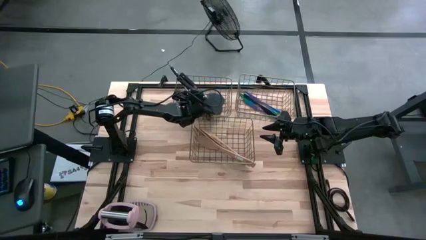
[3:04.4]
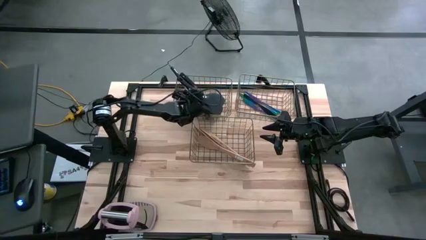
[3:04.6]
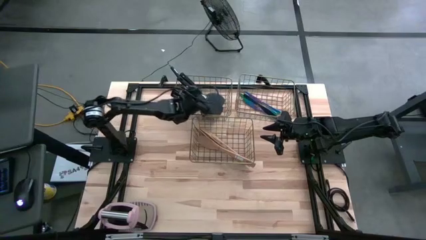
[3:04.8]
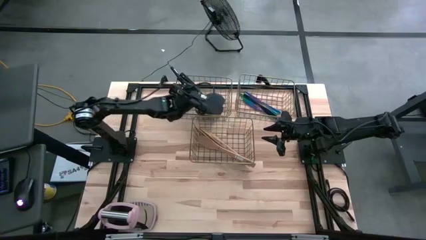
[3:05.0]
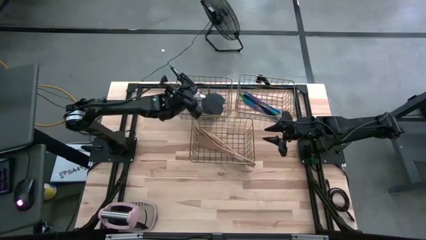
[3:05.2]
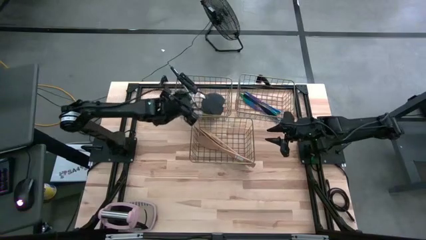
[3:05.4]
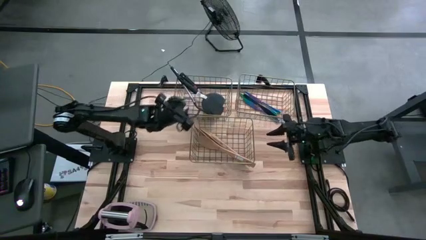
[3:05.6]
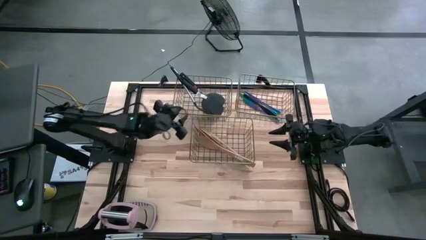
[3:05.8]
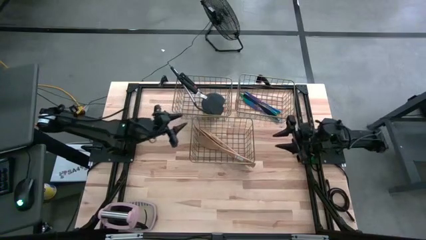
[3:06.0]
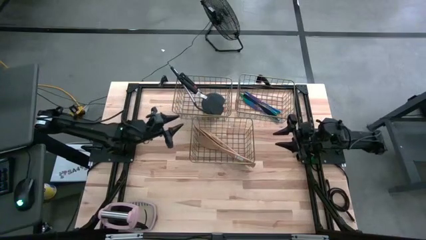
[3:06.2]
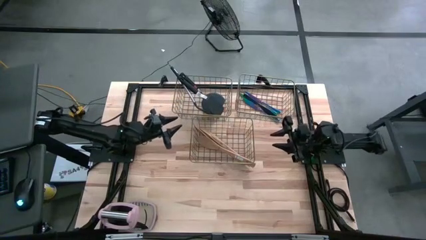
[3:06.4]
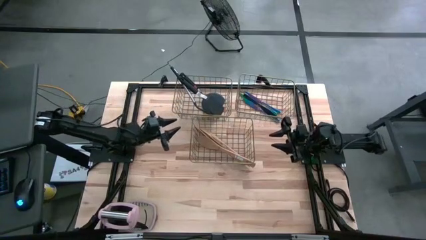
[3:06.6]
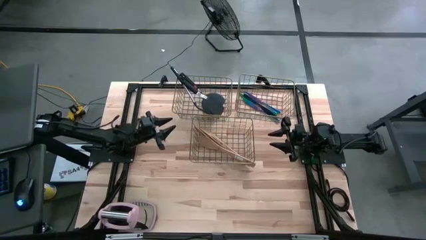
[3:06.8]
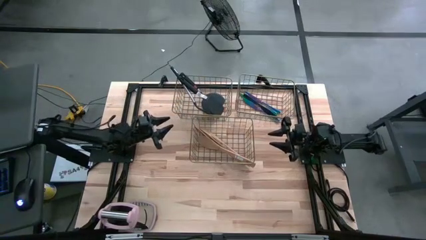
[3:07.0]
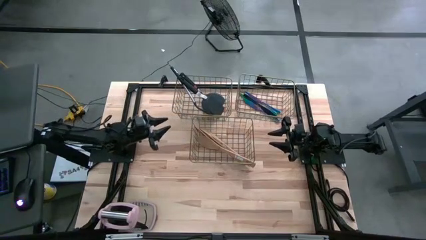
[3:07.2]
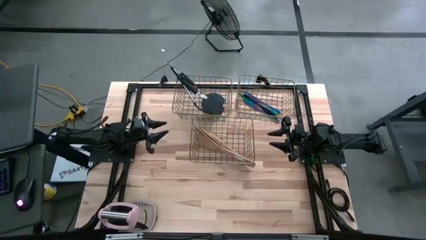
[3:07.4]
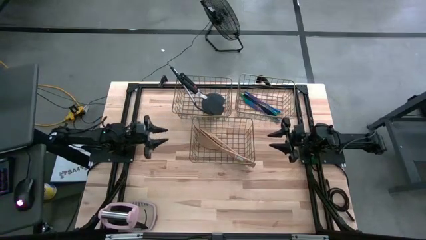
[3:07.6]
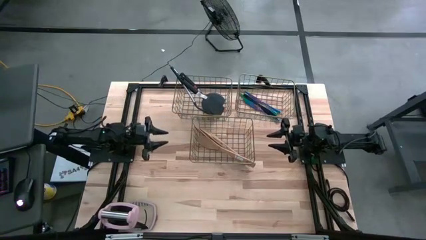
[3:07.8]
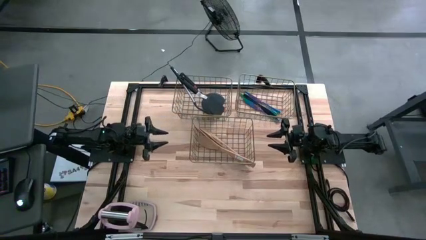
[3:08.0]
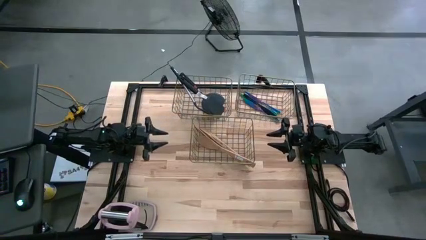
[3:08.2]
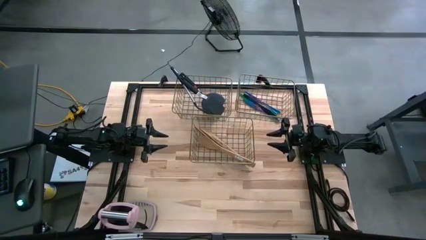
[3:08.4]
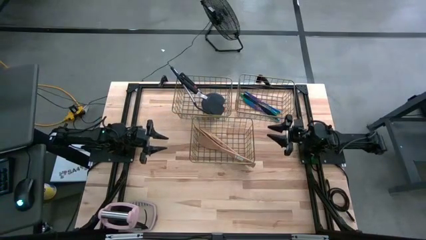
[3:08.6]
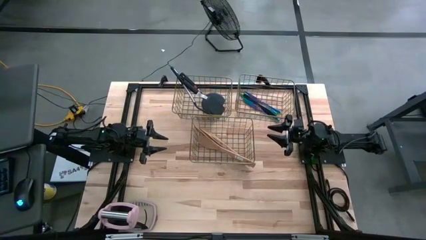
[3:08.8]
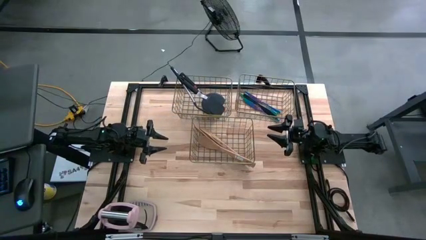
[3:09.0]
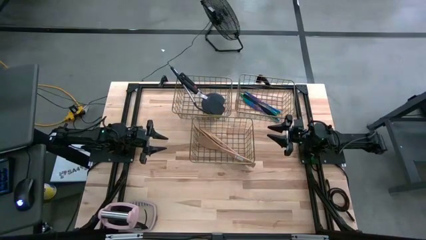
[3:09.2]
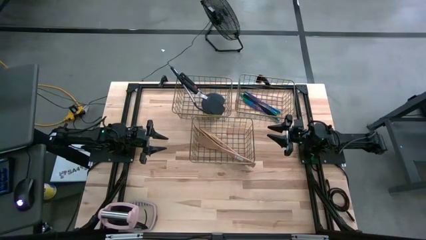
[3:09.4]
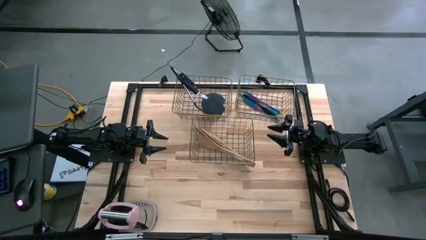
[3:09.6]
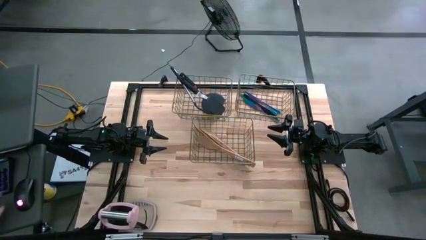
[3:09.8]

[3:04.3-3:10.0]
Task: Pick & Place Kitchen Items
Return to Home Position

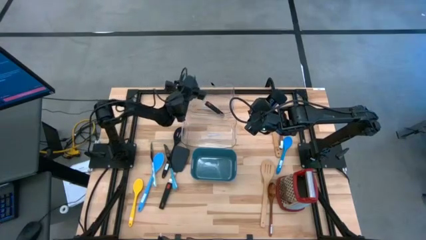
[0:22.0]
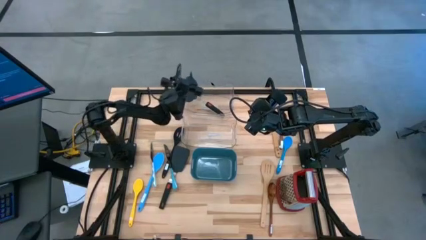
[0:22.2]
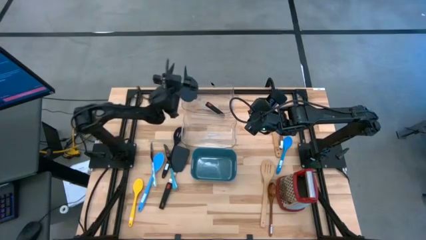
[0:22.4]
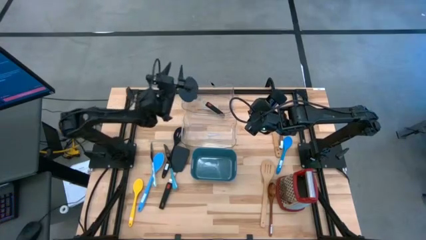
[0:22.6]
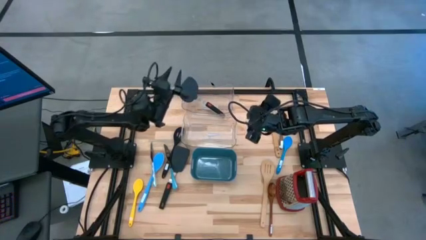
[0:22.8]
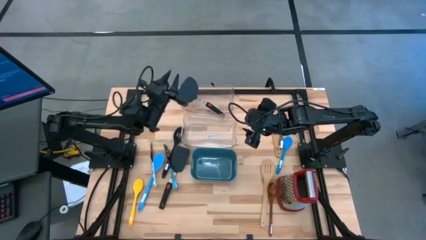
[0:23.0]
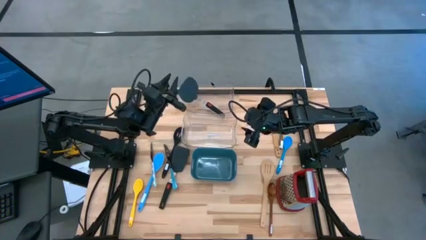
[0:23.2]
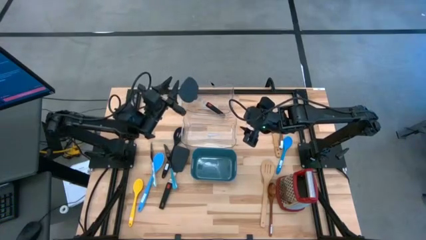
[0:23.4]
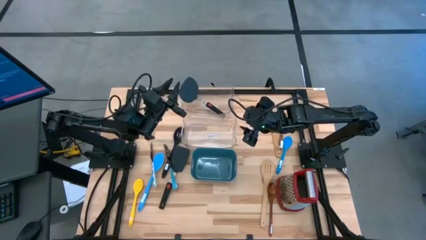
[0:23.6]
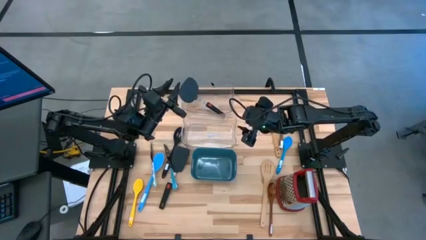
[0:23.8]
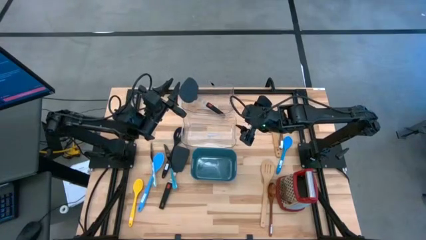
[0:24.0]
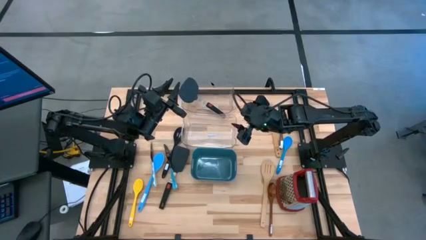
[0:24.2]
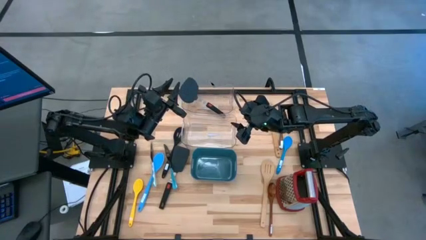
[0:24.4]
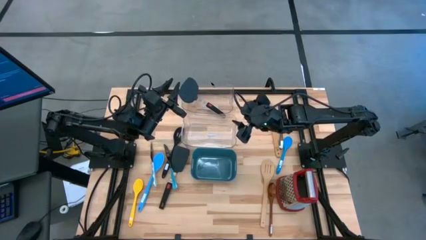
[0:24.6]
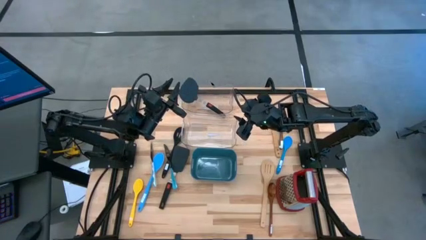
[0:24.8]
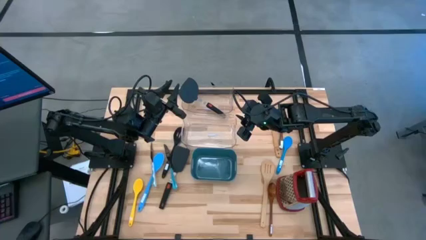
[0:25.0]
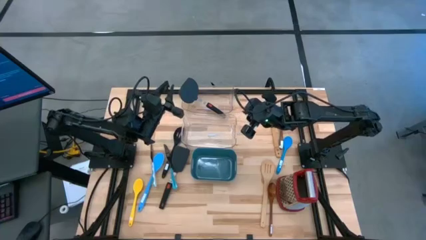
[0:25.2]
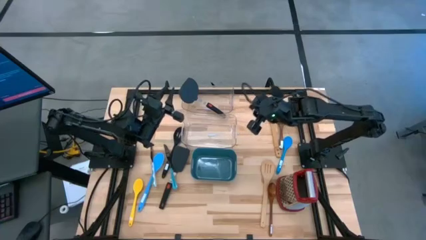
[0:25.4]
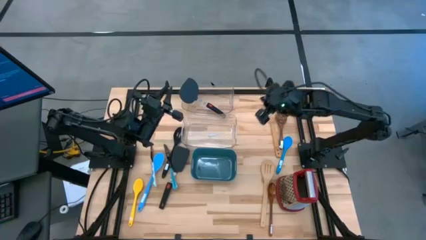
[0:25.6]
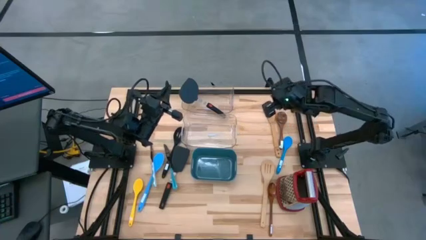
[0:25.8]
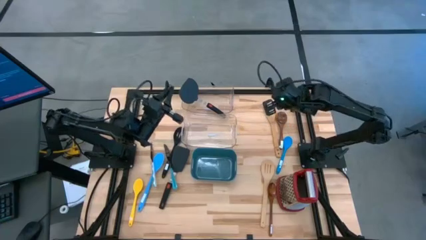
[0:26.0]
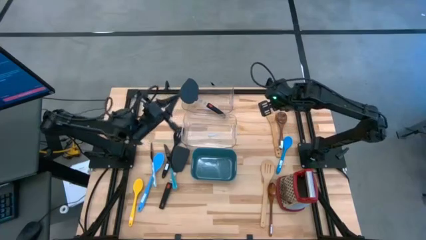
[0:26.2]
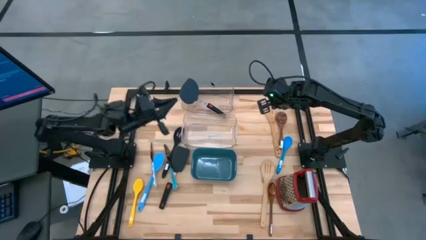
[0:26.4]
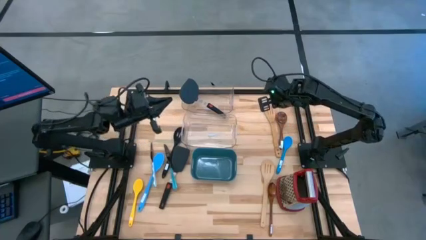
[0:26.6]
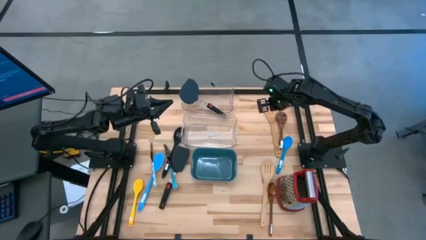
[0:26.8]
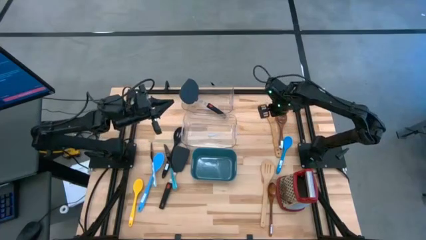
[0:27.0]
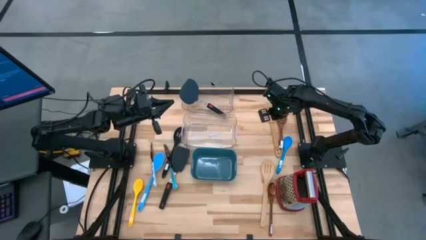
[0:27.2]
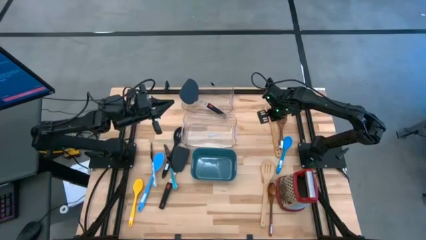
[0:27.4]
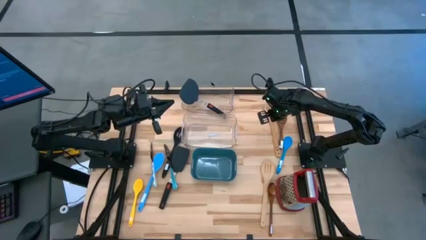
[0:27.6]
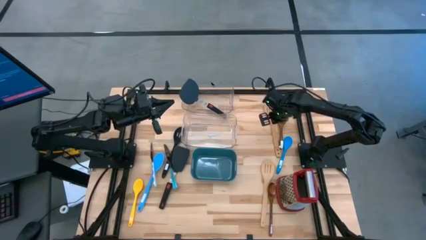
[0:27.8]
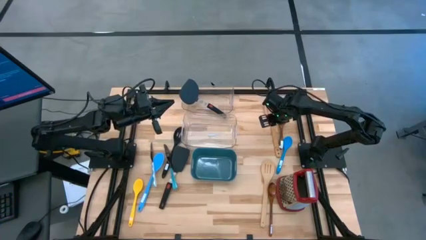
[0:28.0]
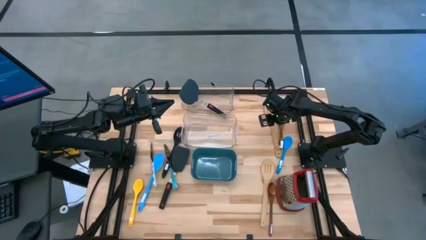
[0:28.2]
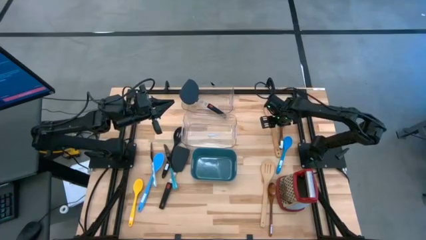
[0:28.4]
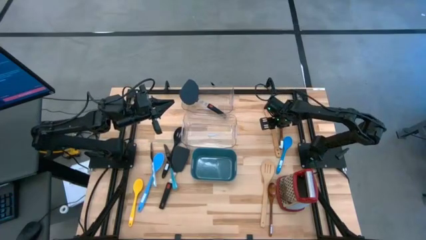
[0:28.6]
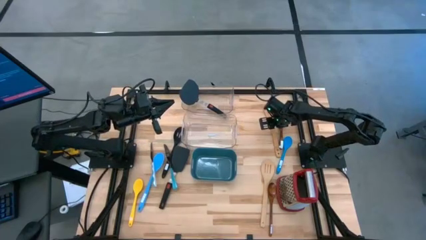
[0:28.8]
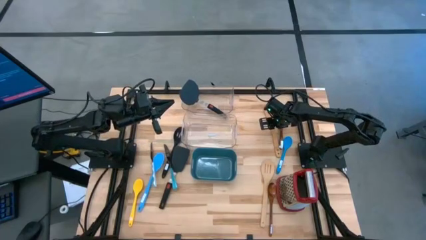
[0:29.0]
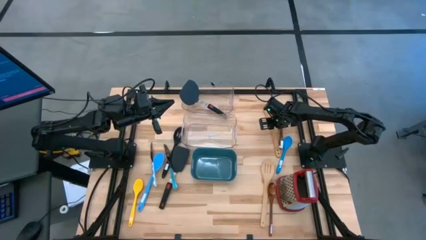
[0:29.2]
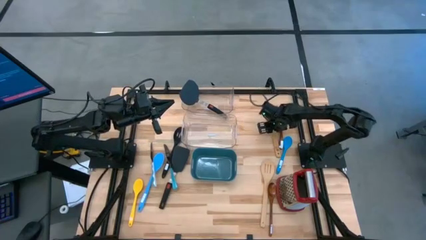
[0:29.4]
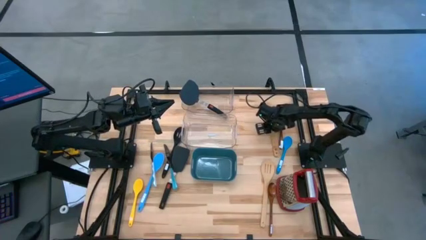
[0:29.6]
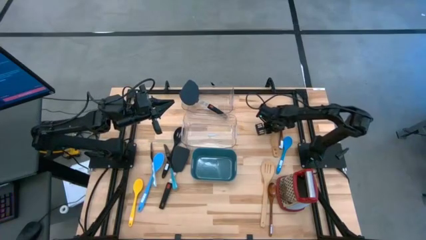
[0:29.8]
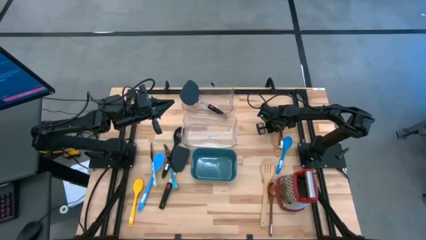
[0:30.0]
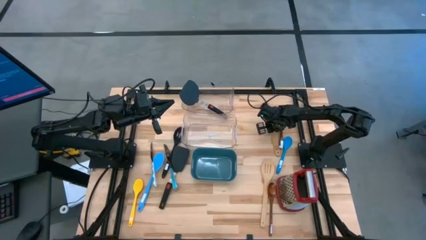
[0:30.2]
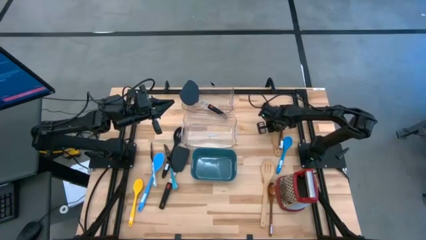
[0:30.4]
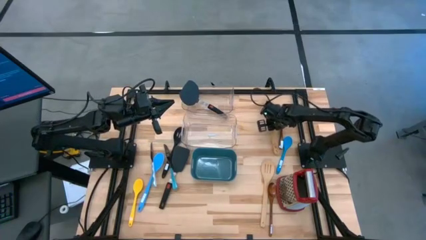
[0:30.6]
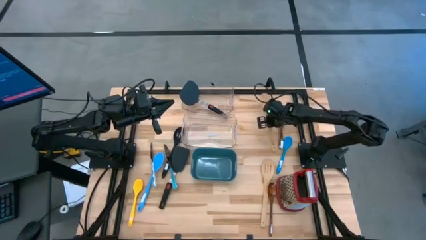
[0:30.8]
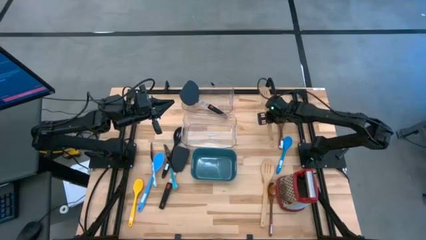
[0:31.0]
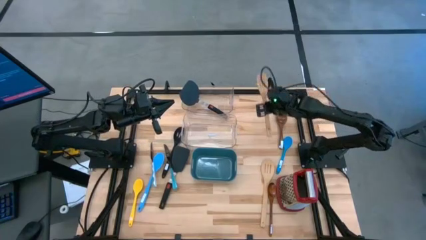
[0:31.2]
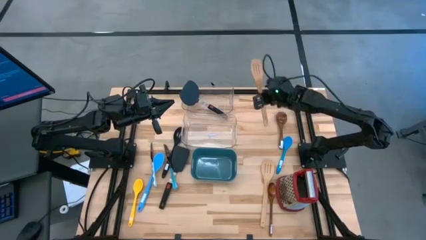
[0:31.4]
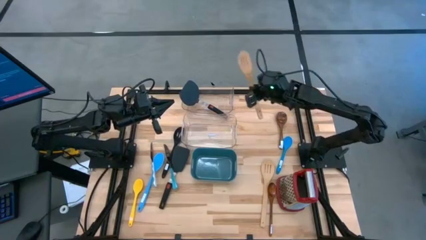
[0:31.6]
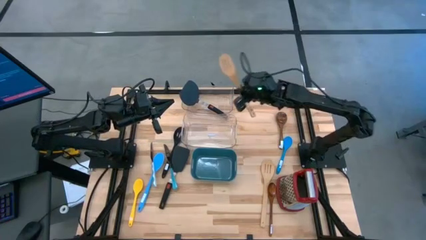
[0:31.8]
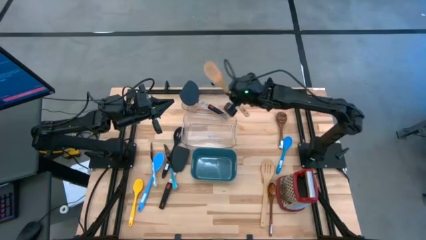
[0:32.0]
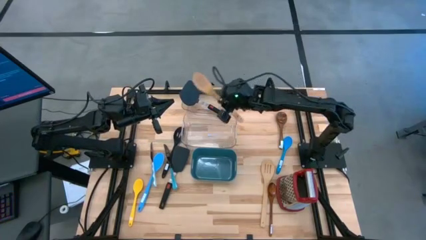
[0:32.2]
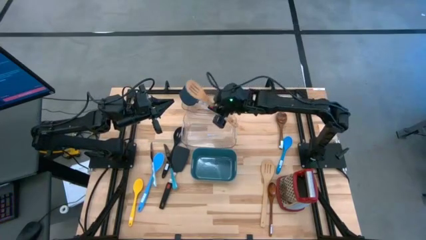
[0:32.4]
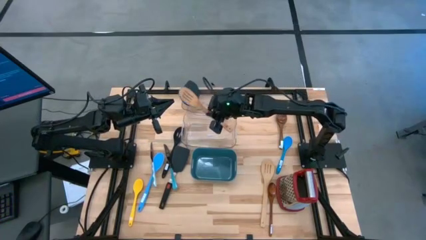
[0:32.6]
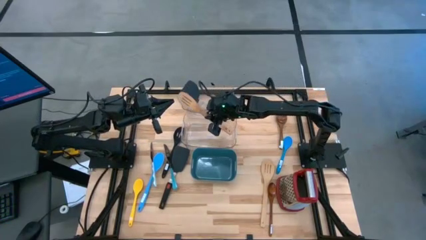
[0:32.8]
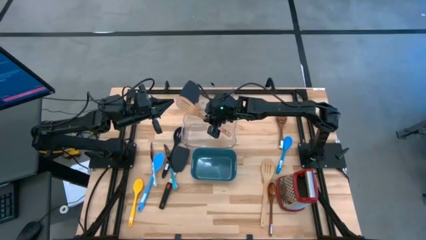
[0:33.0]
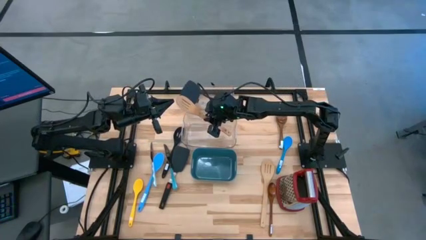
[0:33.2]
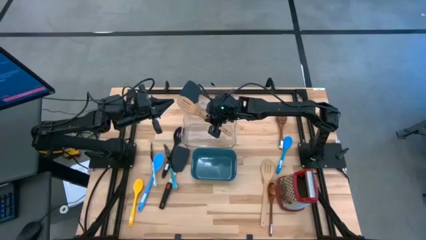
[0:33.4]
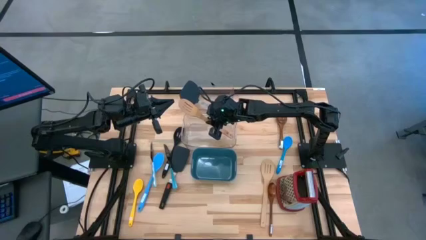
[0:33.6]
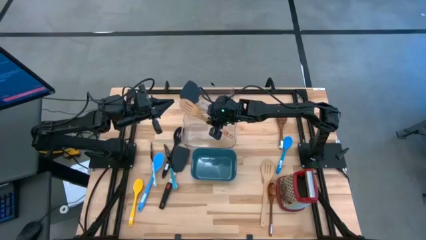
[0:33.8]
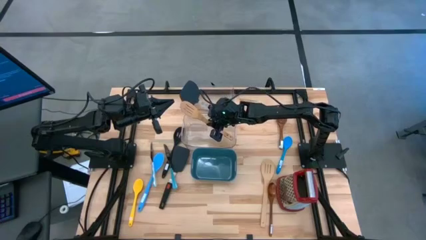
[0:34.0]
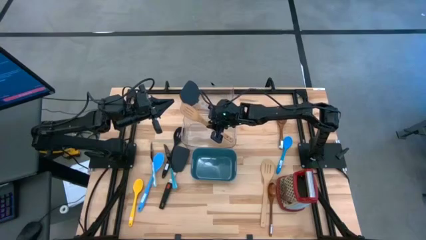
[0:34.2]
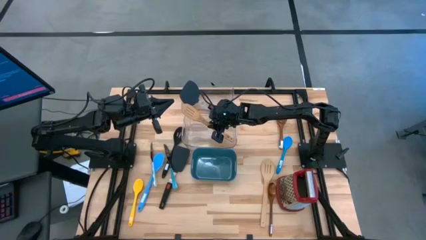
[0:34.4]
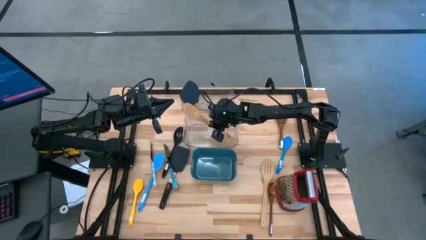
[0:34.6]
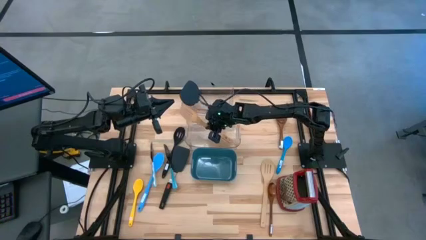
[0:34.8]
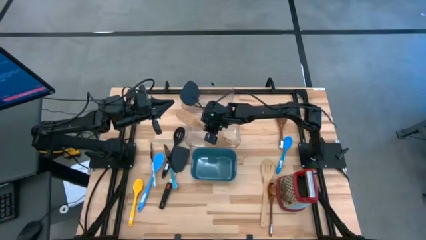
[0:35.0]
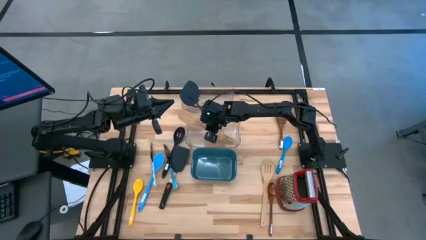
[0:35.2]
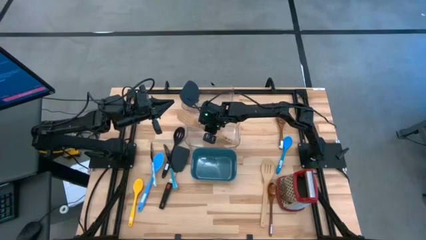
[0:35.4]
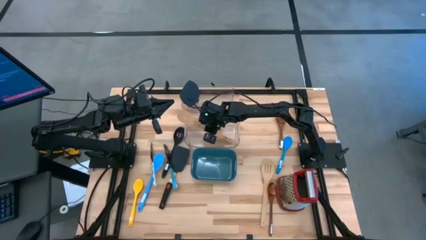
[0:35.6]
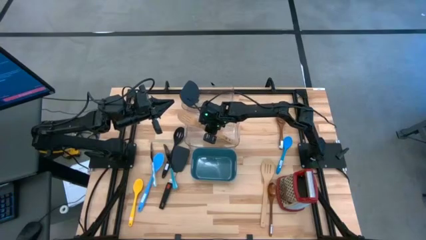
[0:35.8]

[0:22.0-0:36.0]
Task: Pick & Place Kitchen Items
Put the top wooden slotted spatula into the bottom transparent bin
